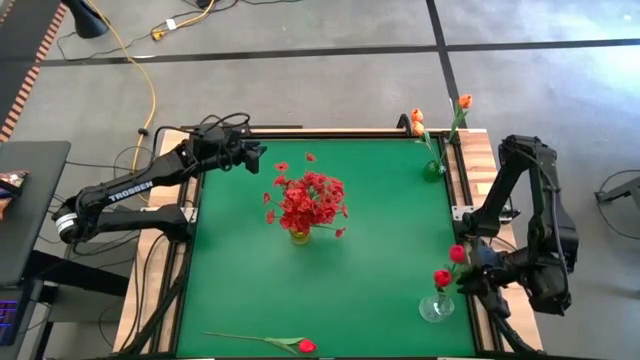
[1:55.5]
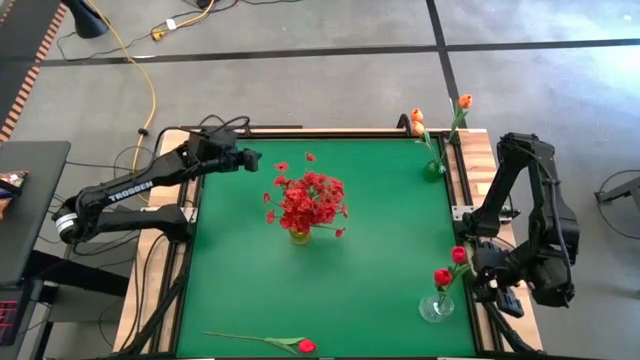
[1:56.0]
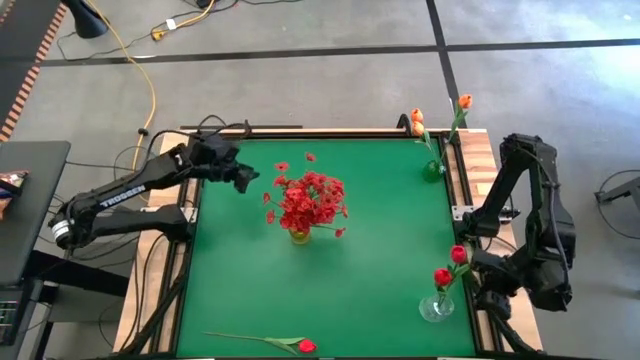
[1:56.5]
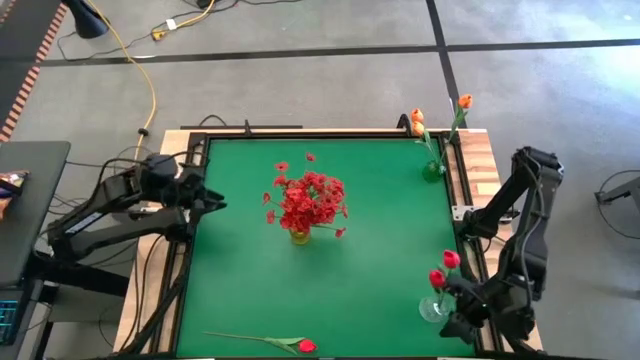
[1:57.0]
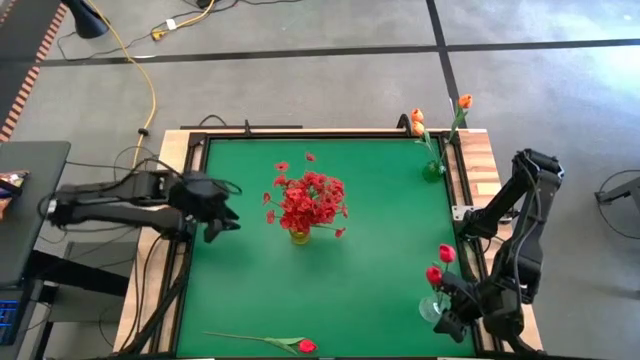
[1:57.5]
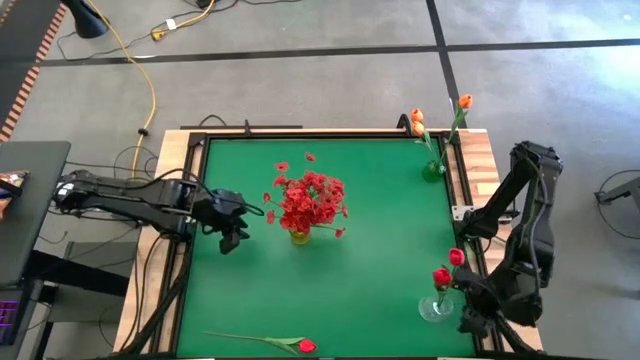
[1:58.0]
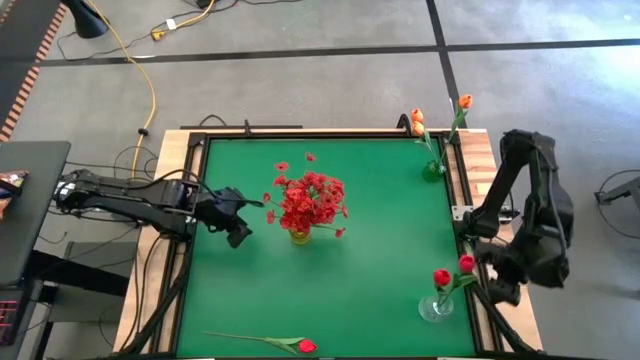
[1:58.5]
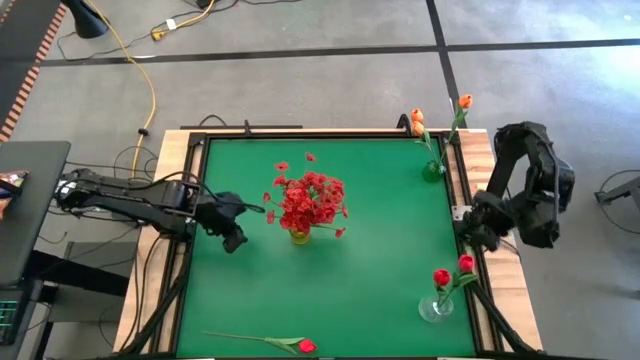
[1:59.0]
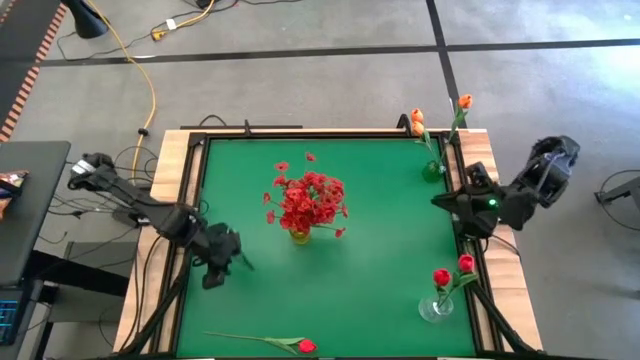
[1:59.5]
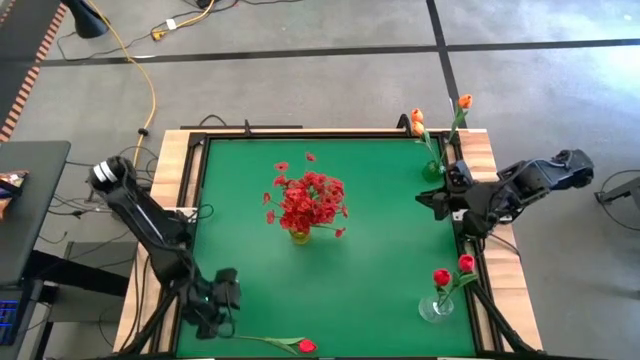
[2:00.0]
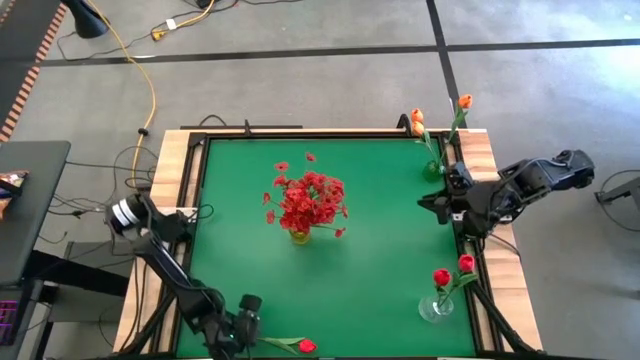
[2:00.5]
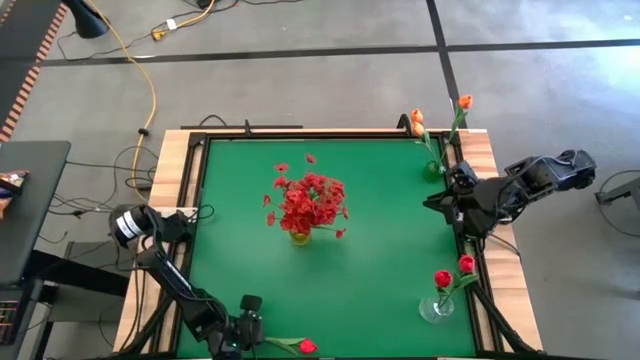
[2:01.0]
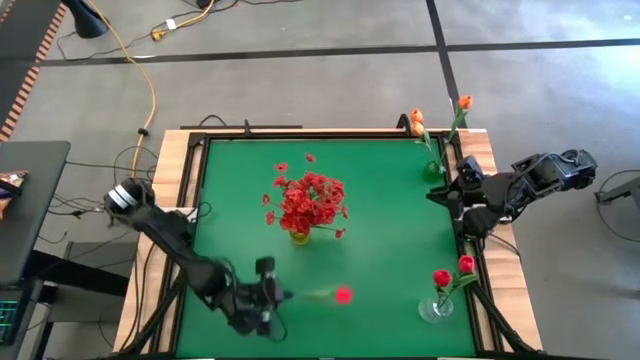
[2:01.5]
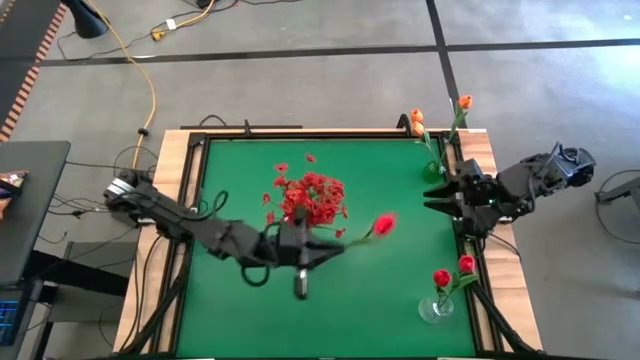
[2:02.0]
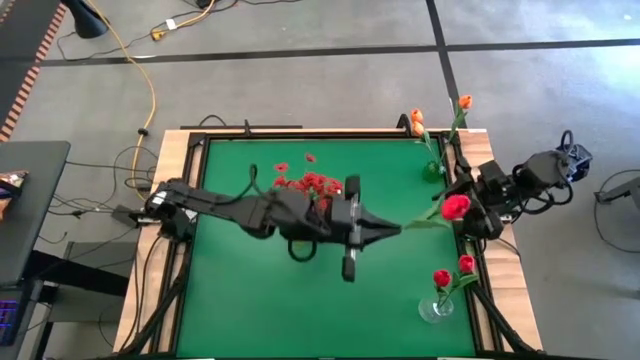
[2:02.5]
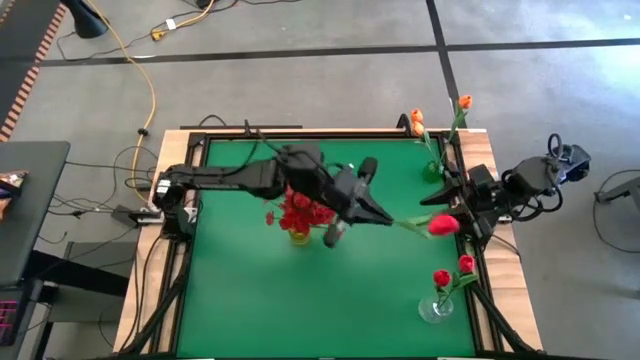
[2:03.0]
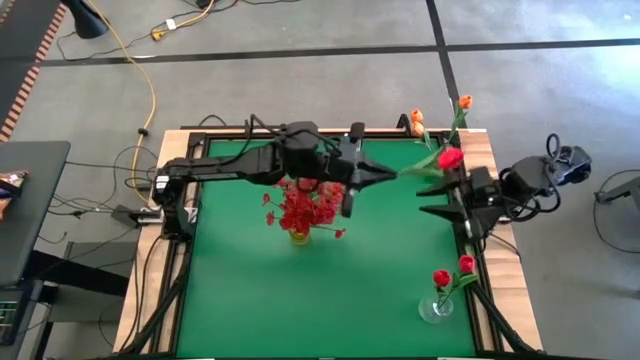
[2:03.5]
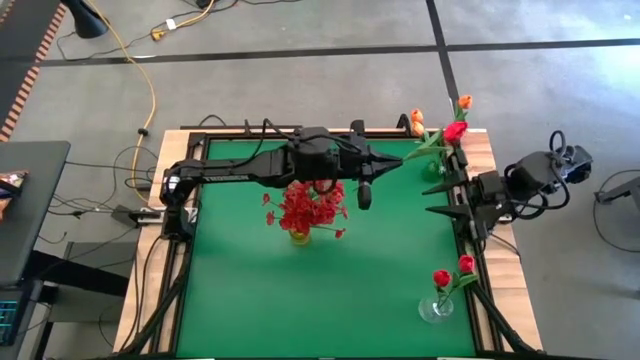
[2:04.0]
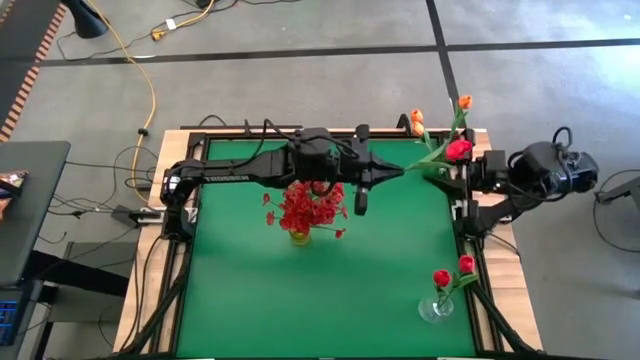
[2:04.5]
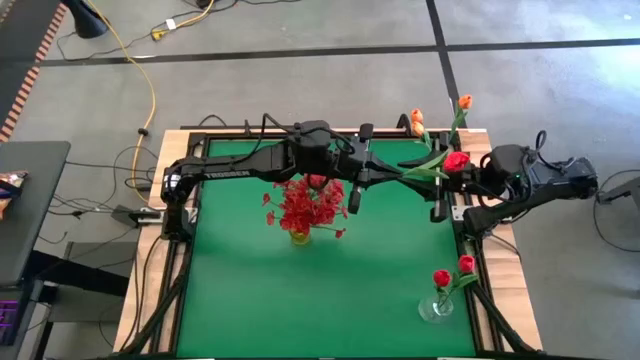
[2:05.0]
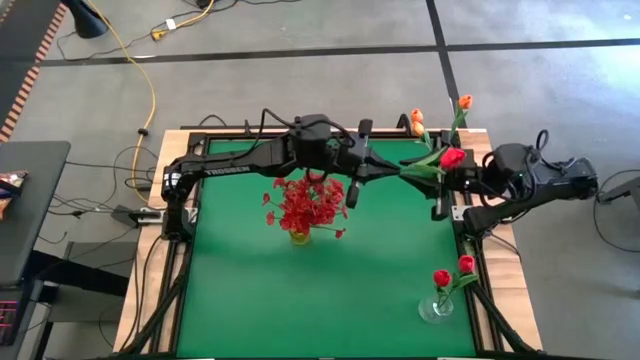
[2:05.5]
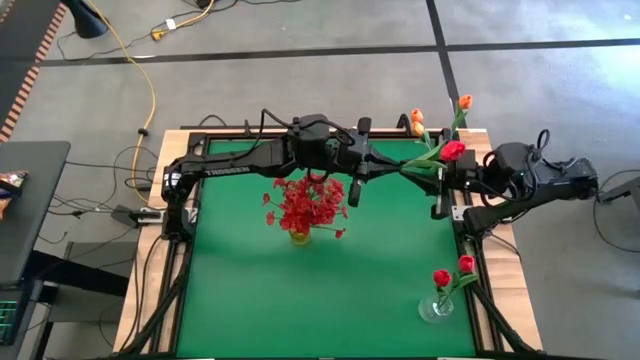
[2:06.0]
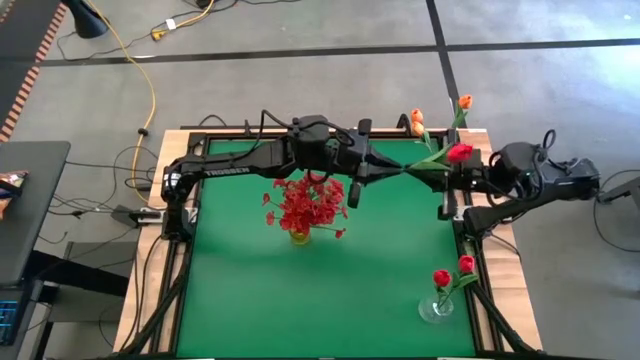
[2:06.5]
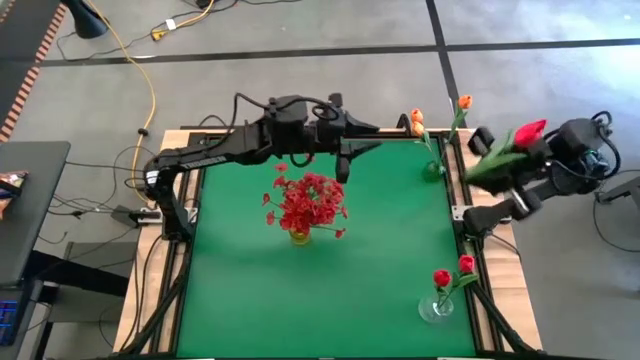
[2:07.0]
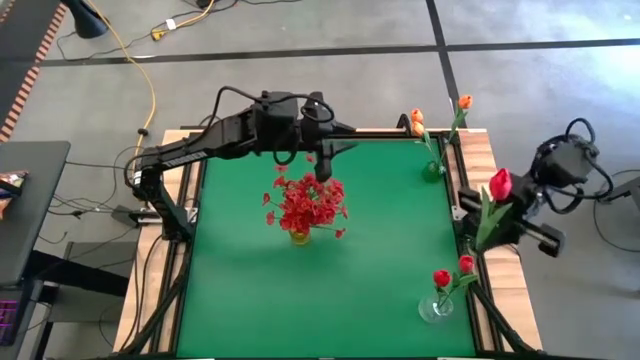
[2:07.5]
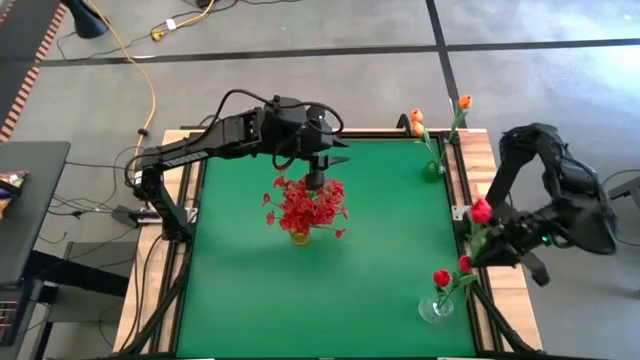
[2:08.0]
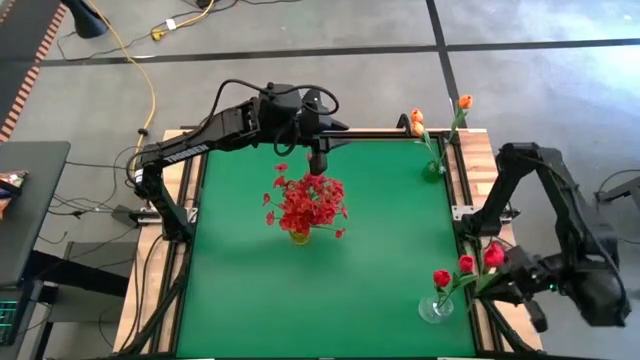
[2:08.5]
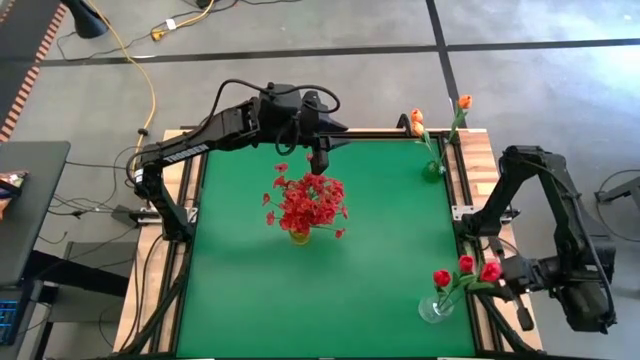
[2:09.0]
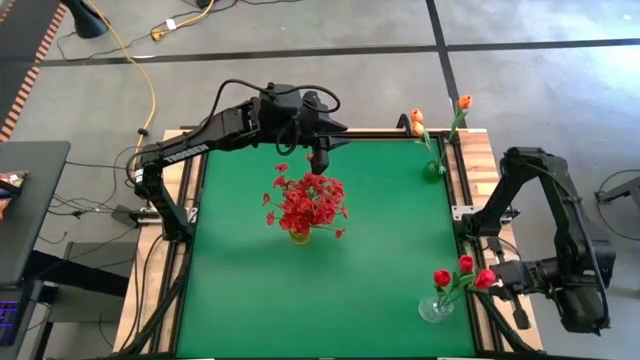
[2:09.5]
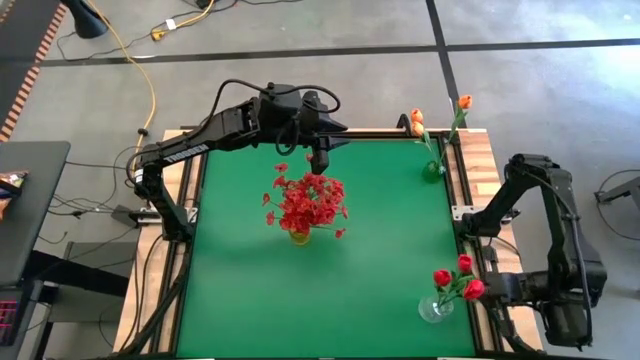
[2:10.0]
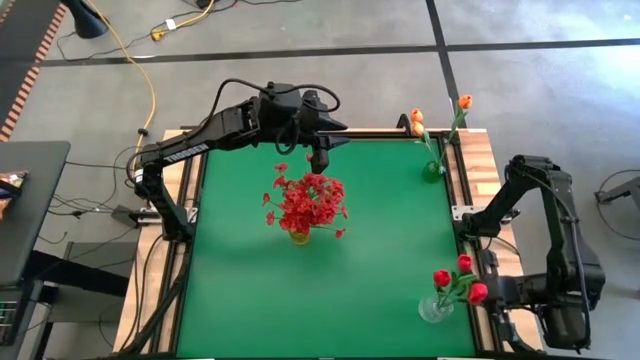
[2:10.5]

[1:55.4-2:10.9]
Task: Sort flowers into vase by color
Put the red flower into the transparent vase

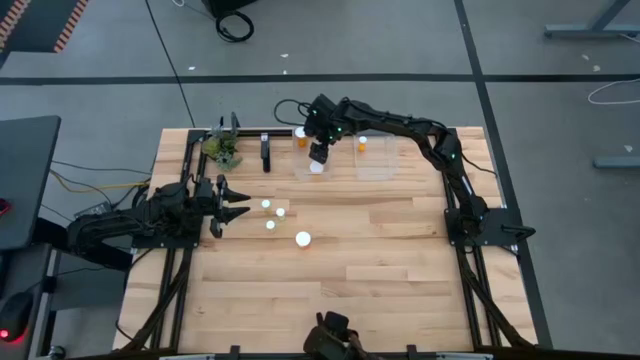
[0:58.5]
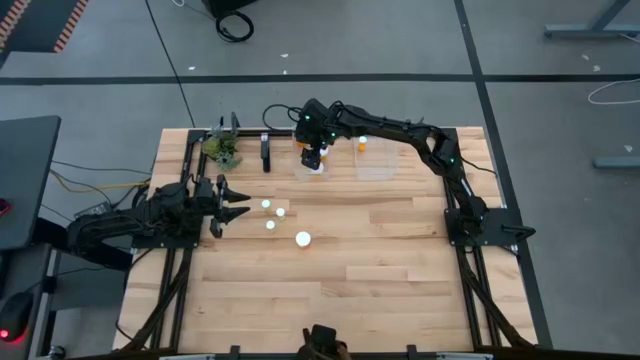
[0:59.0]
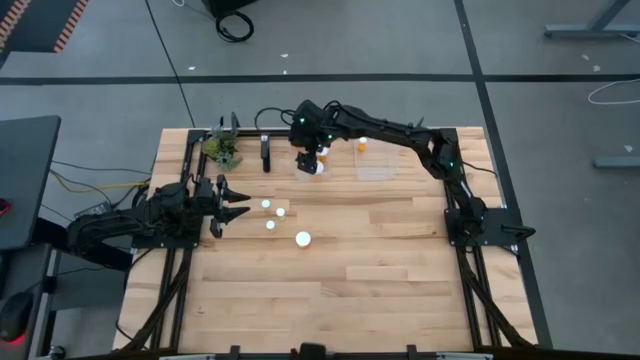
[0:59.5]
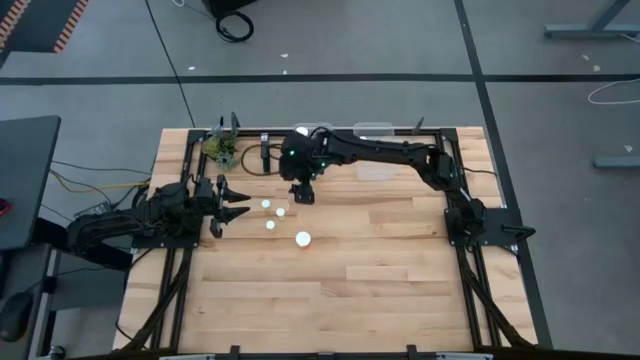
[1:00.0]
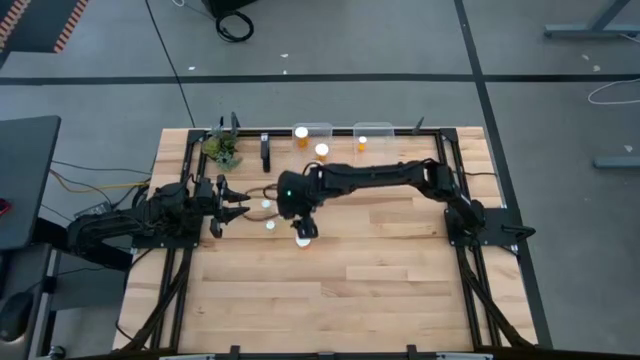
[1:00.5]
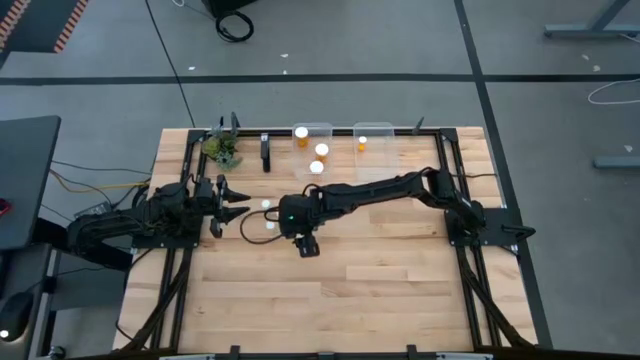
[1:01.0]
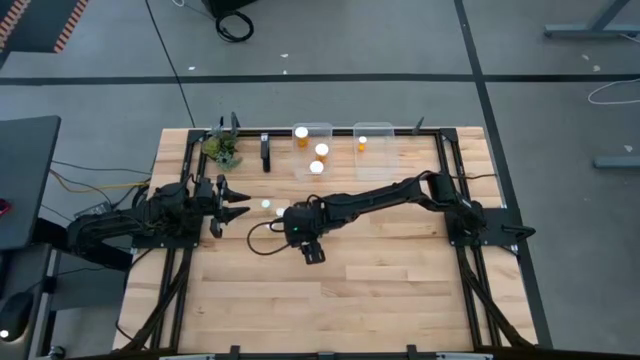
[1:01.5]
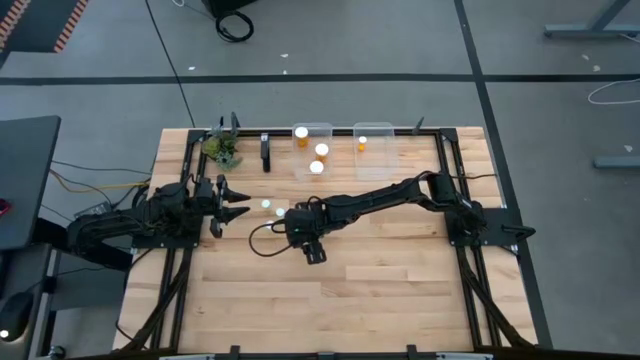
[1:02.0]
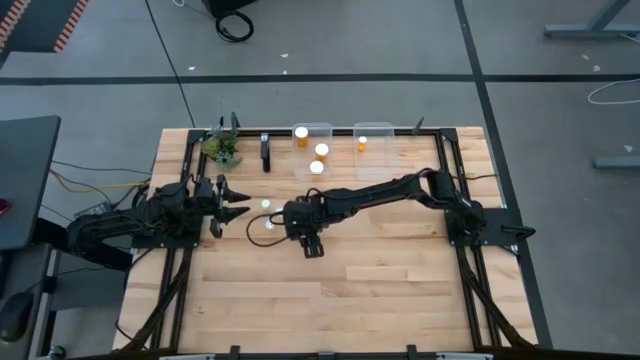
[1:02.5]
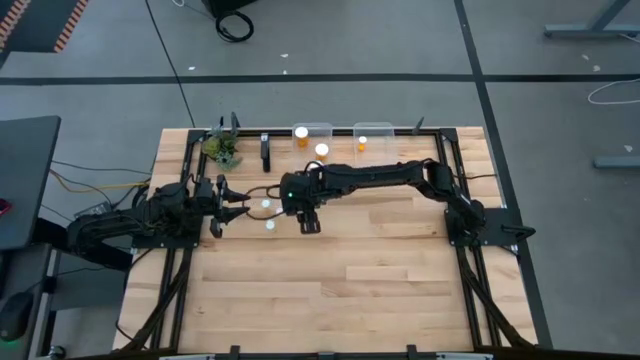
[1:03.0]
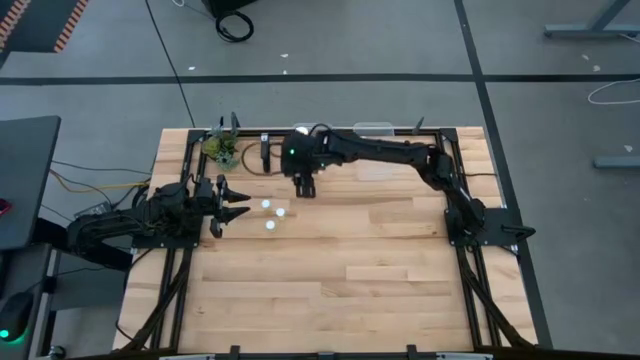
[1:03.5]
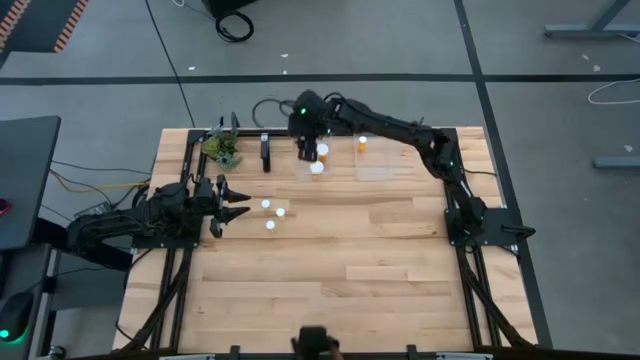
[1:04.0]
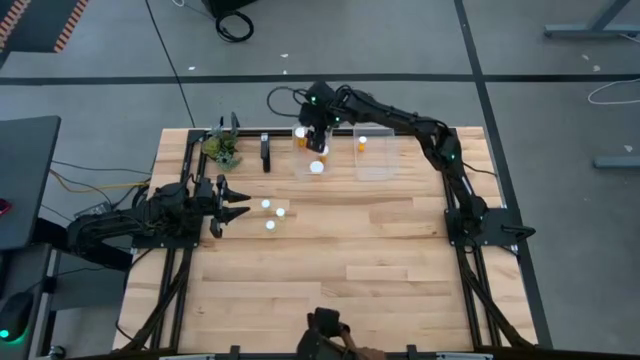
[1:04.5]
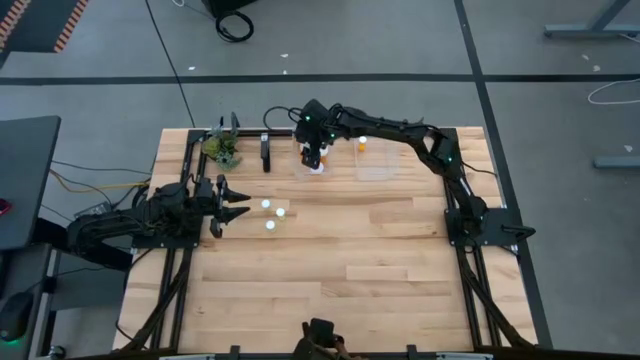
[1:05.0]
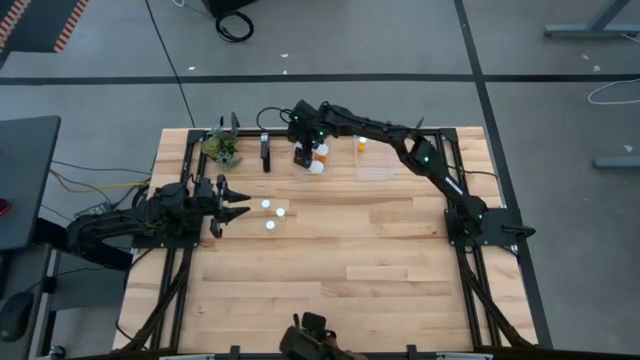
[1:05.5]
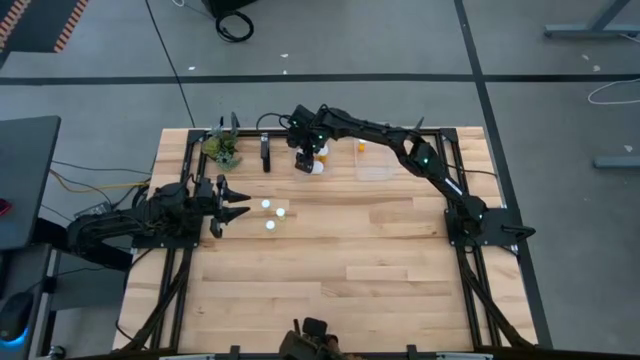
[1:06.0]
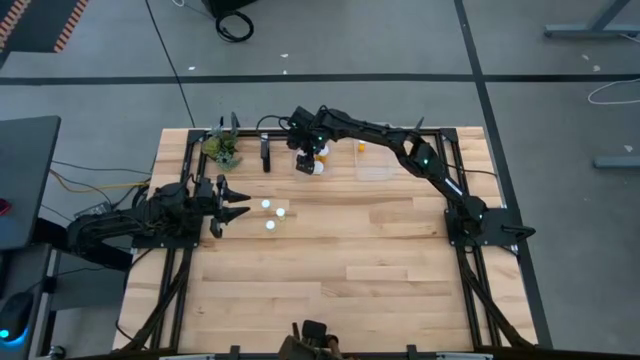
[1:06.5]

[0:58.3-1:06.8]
Task: Pick and place medicine bottles into bin by pill shape (circle, oval)
Put the large orange pill bottle into the left transparent bin
